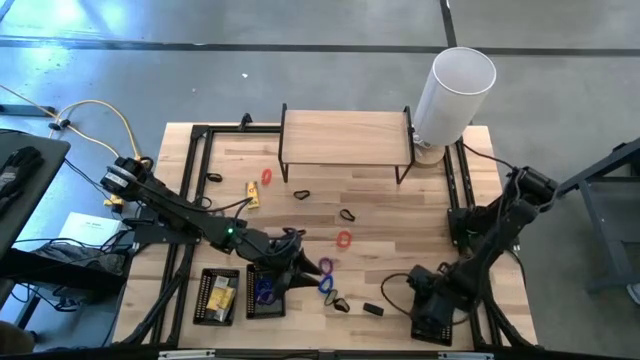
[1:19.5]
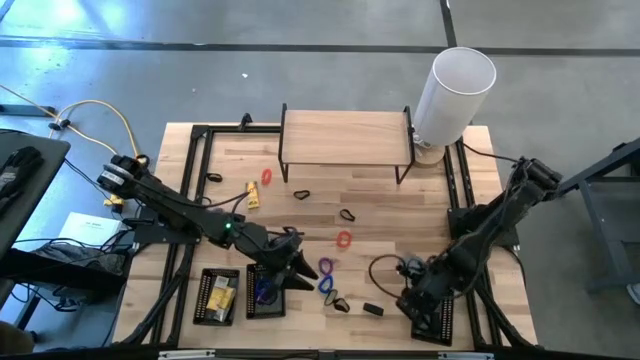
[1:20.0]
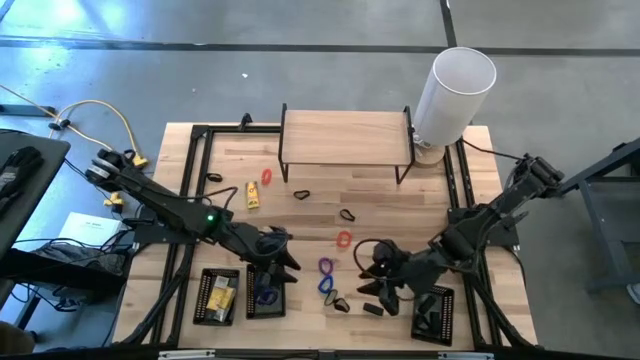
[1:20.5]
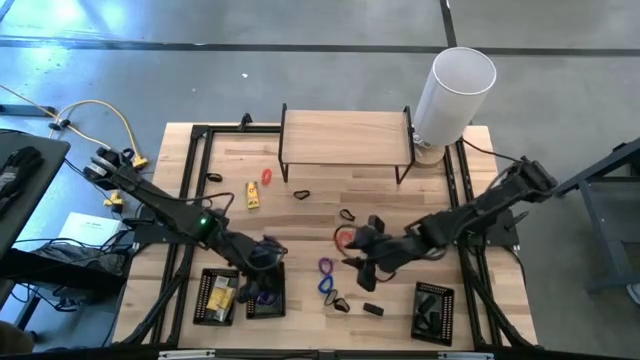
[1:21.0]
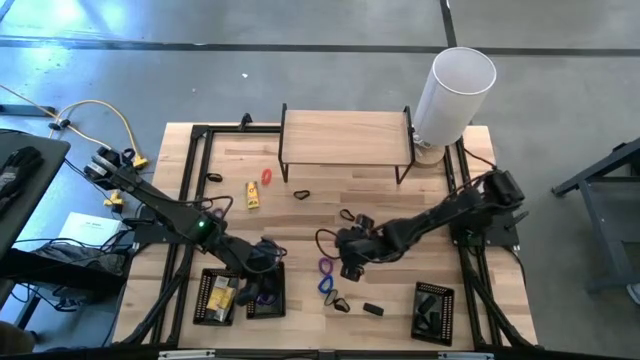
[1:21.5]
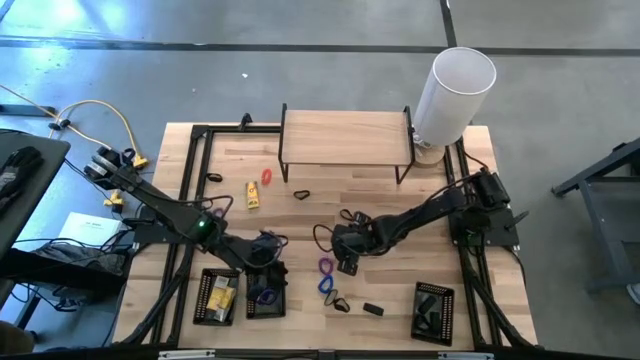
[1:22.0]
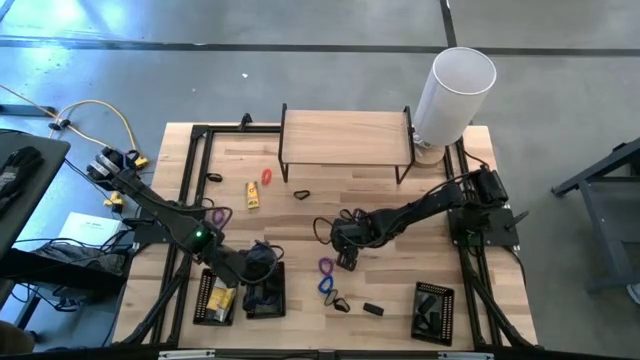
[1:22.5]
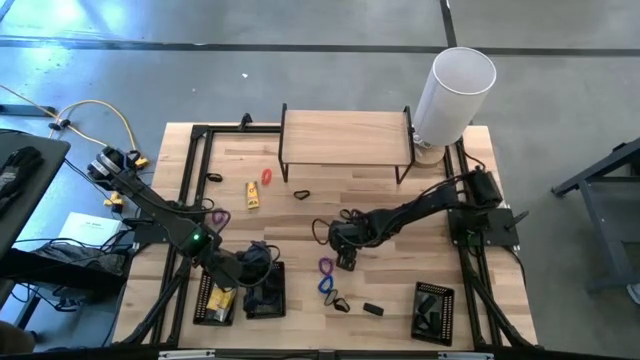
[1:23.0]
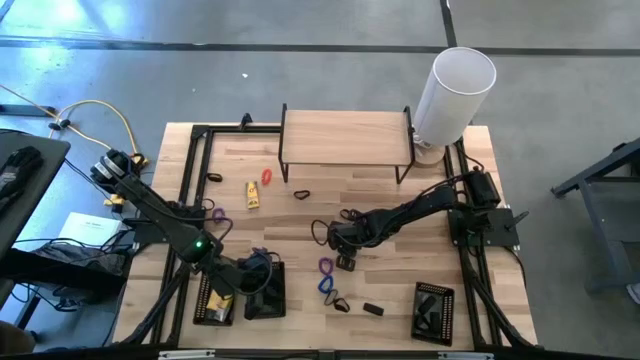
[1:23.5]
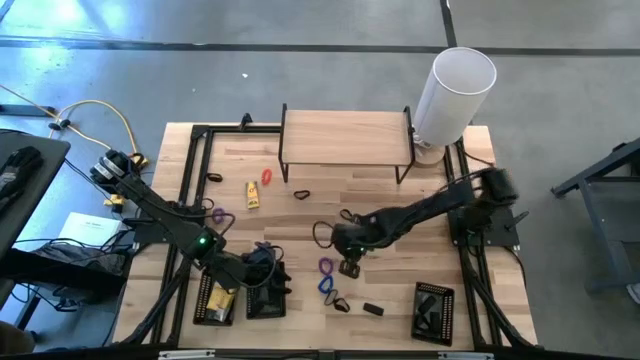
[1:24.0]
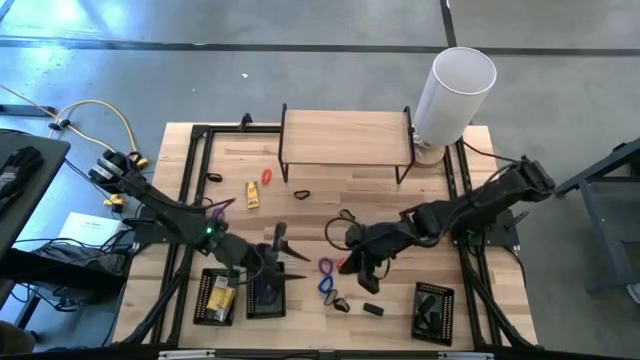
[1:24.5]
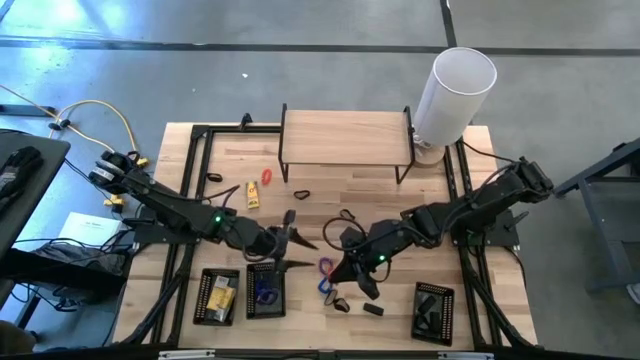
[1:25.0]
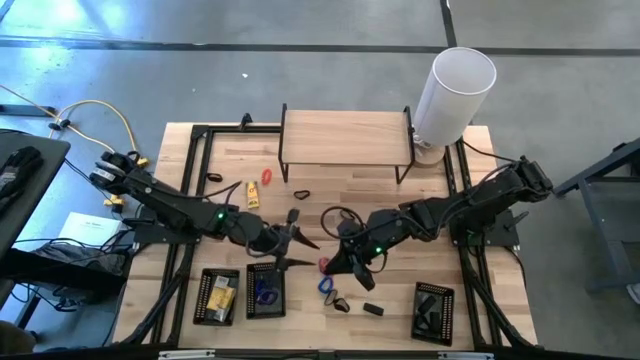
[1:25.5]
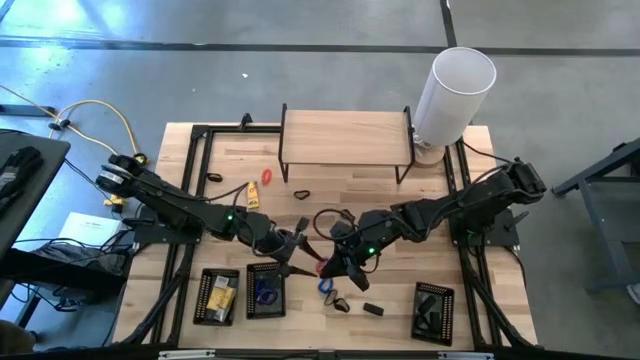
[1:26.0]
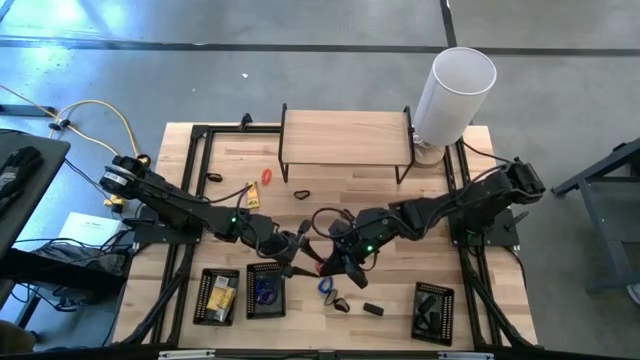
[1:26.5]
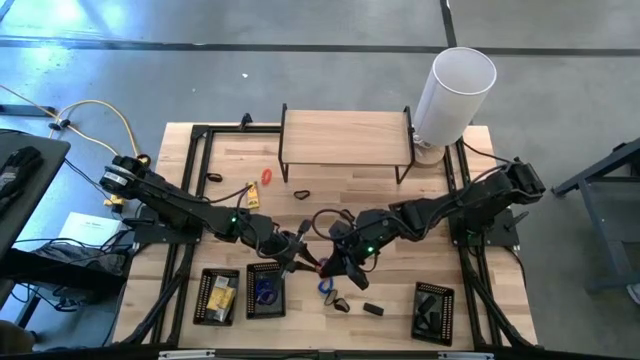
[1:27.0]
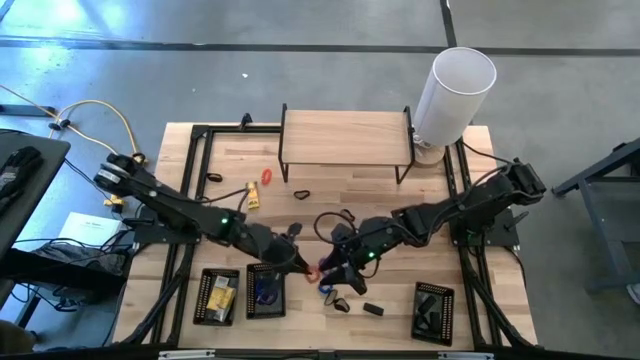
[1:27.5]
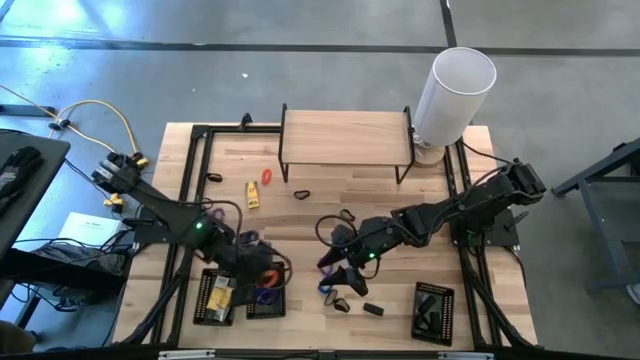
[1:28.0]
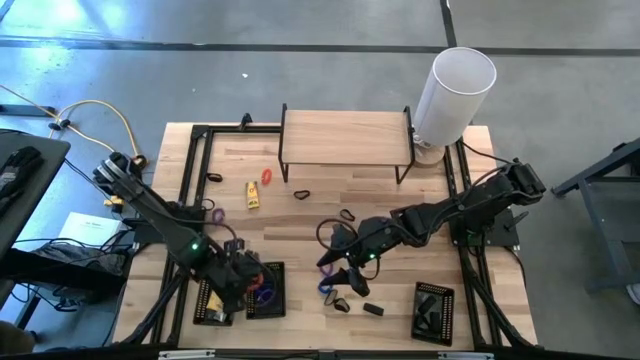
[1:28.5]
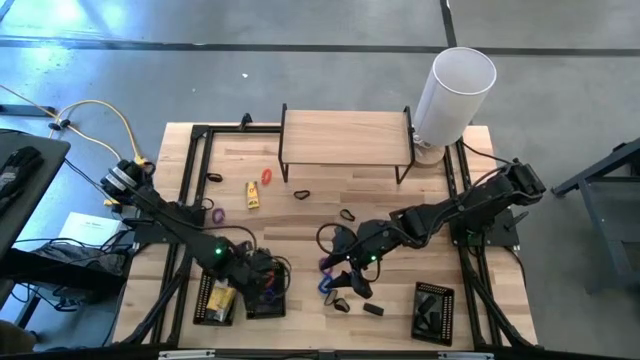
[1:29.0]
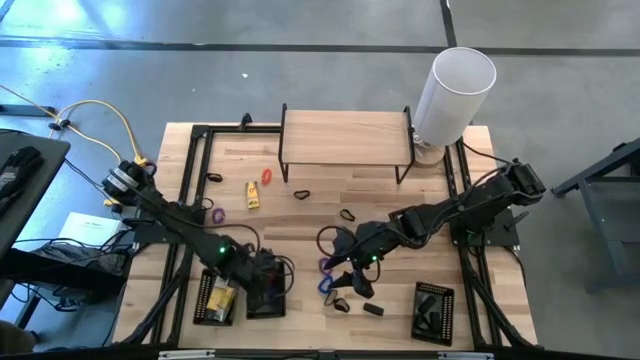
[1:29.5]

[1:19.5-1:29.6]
Task: Pick & Place Office Desk Supplies
Put the orange spring key chain into the middle black basket

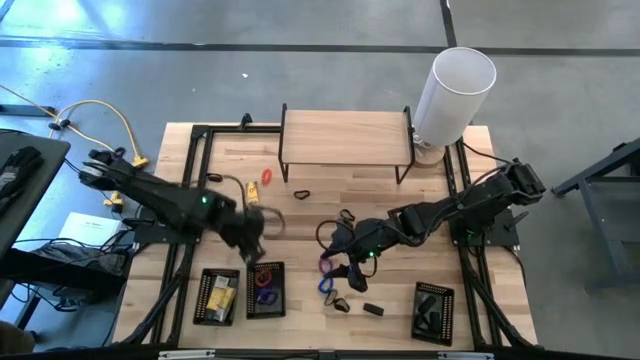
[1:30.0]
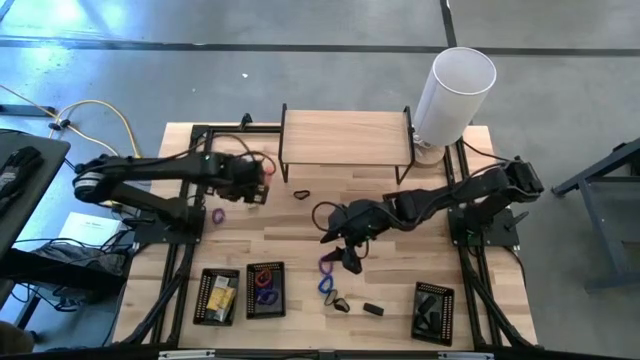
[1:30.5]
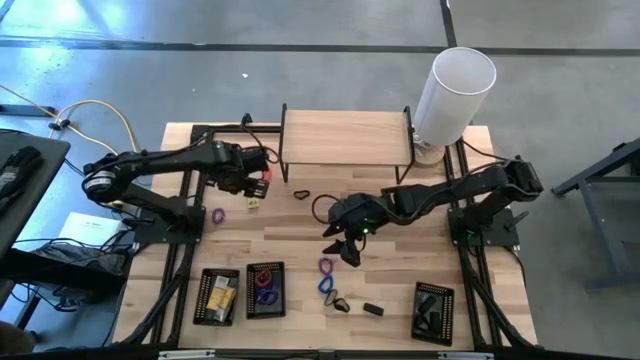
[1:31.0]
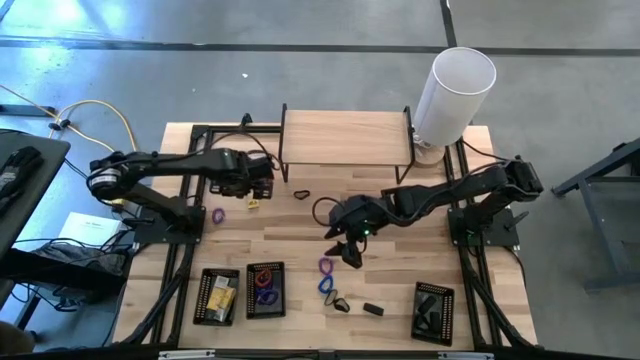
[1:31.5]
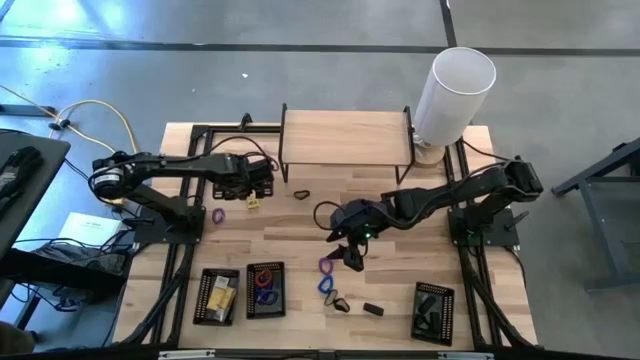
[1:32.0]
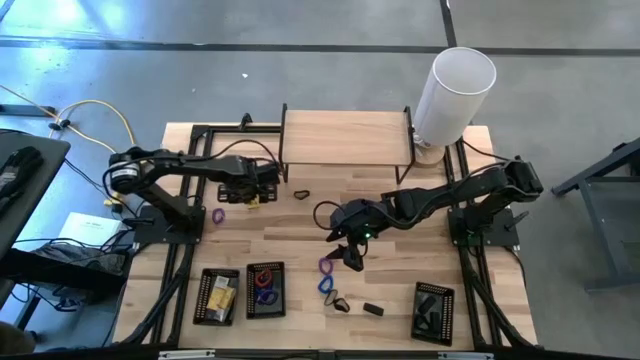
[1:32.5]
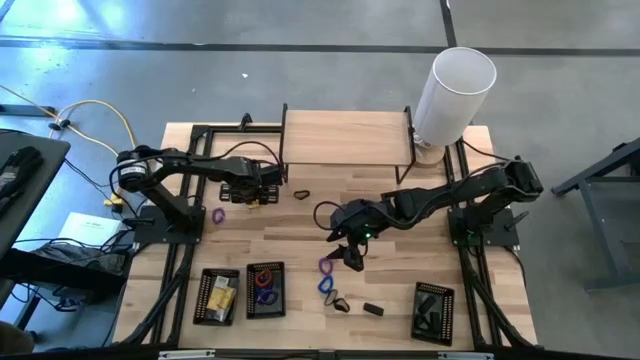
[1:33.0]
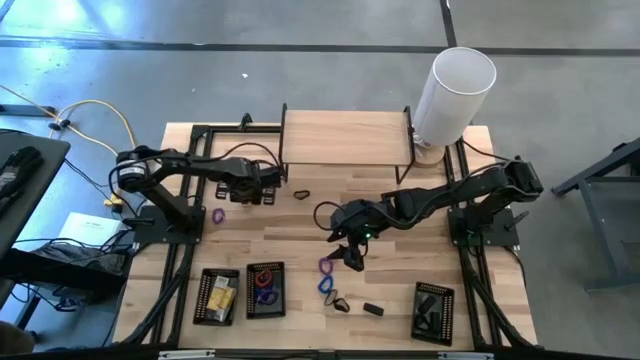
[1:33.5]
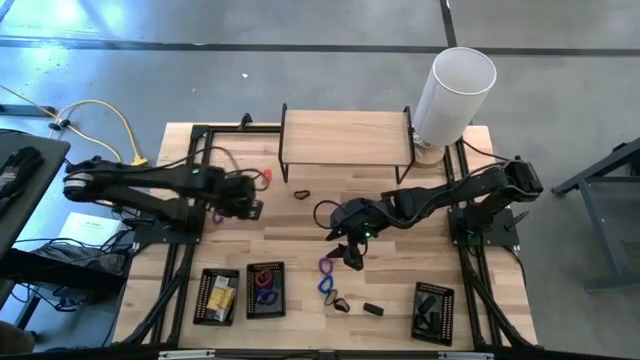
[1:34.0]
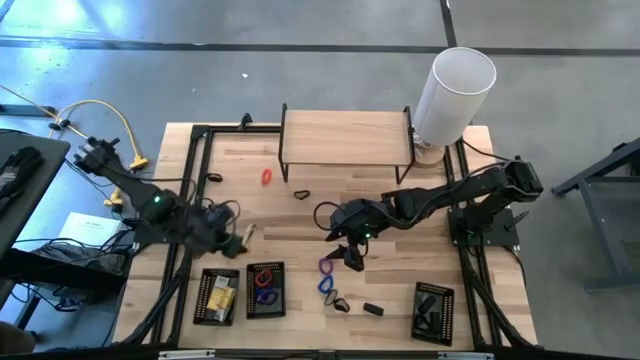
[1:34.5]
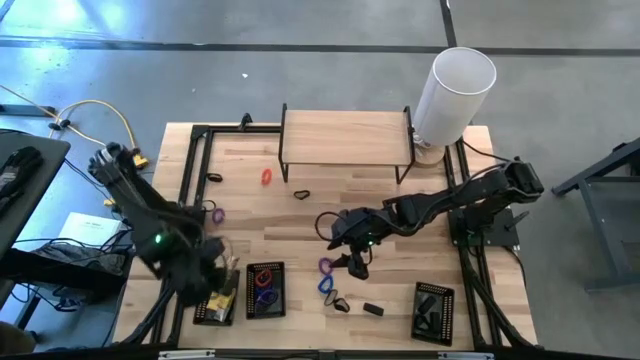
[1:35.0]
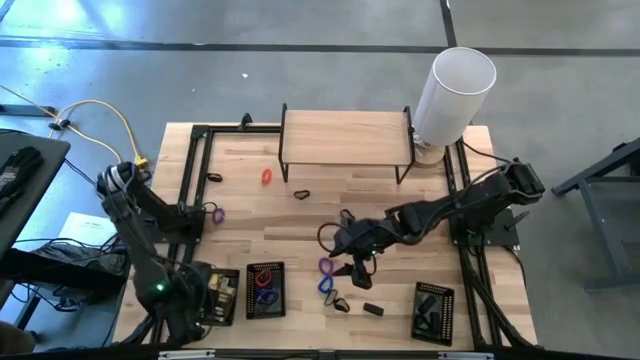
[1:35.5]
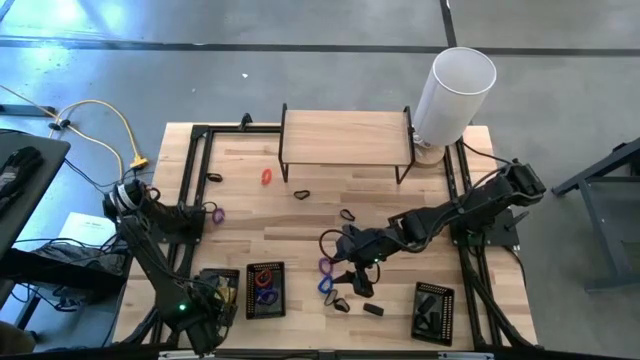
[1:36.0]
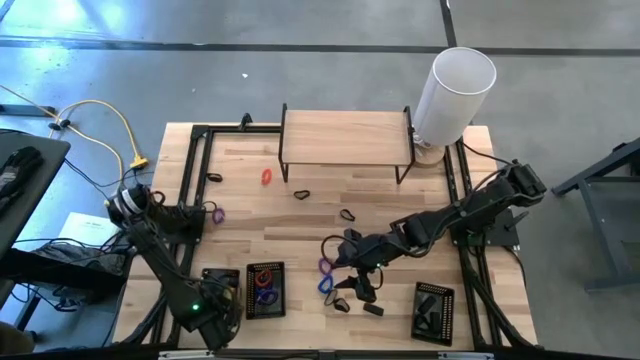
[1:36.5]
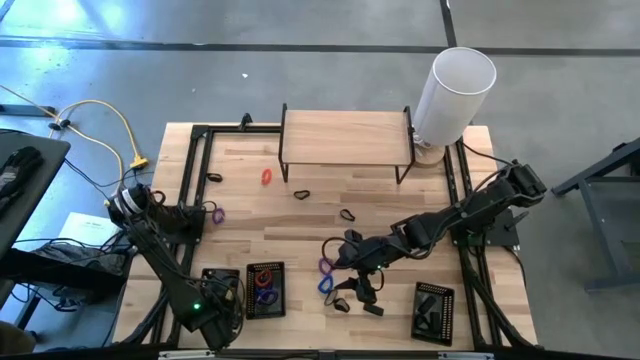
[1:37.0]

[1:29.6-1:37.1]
Put the crayon box into the left black basket

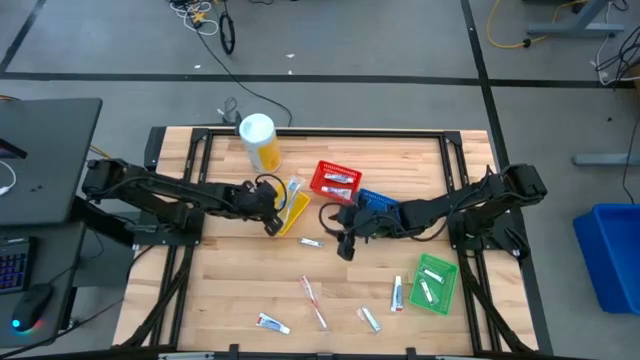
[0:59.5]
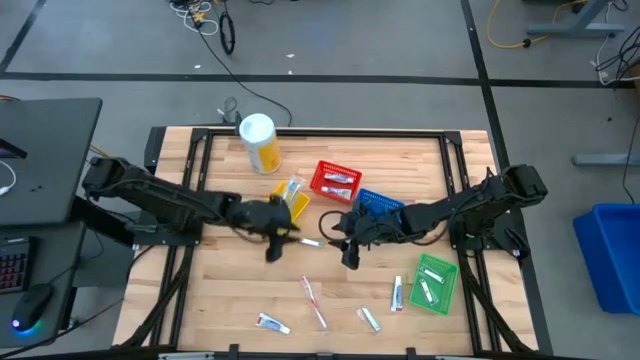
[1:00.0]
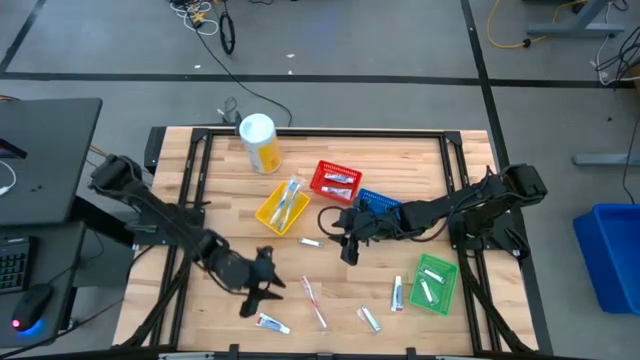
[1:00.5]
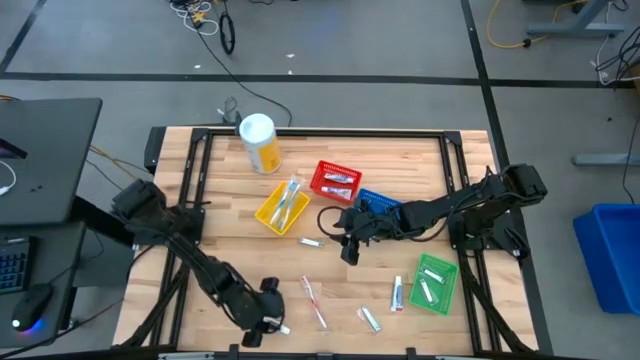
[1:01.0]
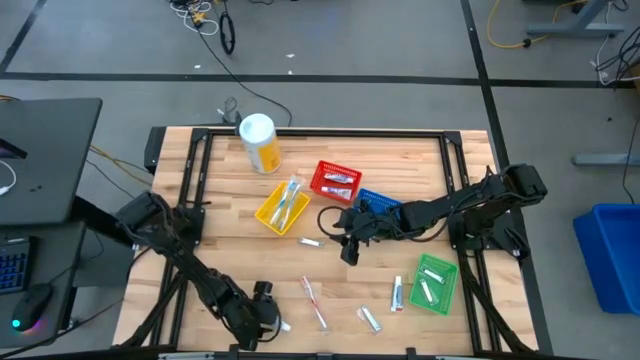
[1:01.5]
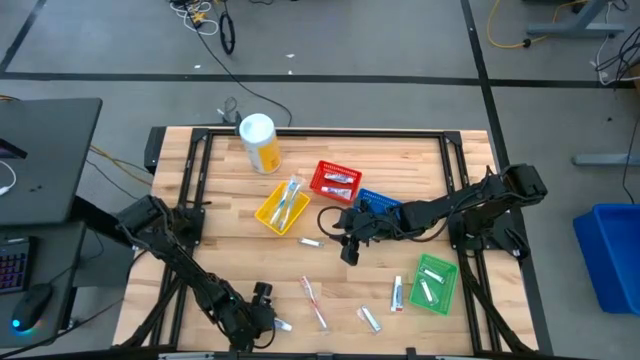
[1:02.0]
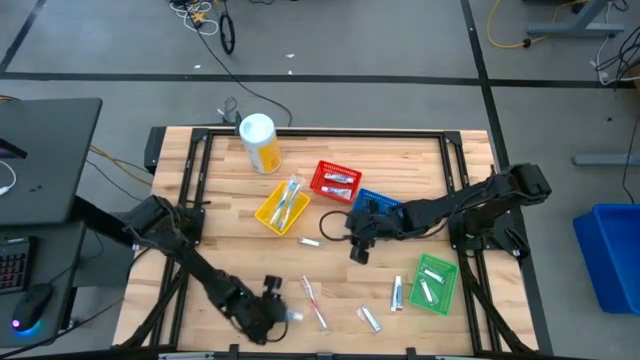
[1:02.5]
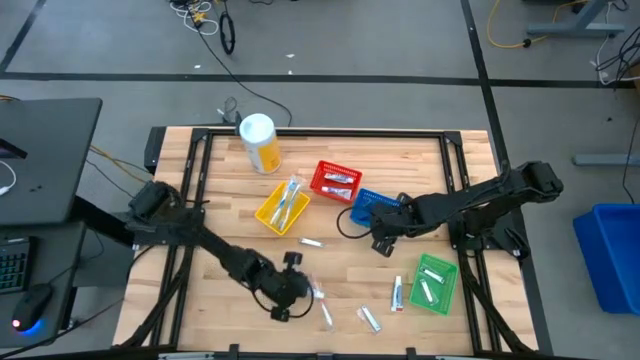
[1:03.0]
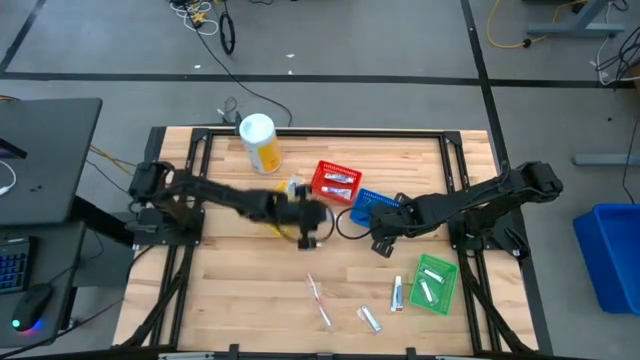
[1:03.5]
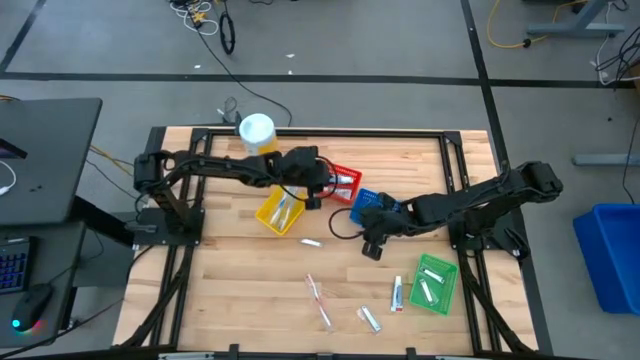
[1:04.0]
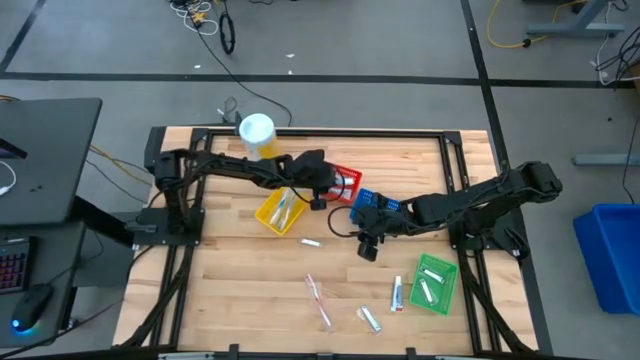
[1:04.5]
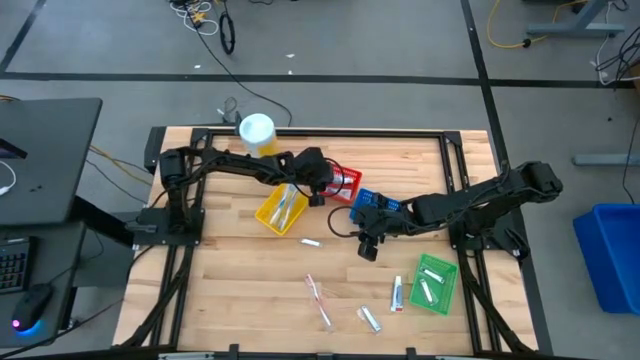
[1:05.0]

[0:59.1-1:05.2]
Task: Pick & Place Travel size toiletries
Put the white toothpaste into the red bin
